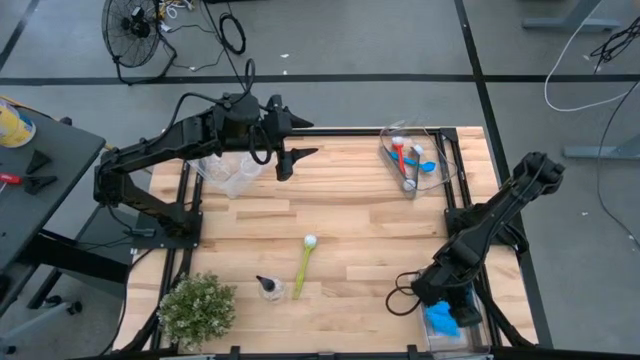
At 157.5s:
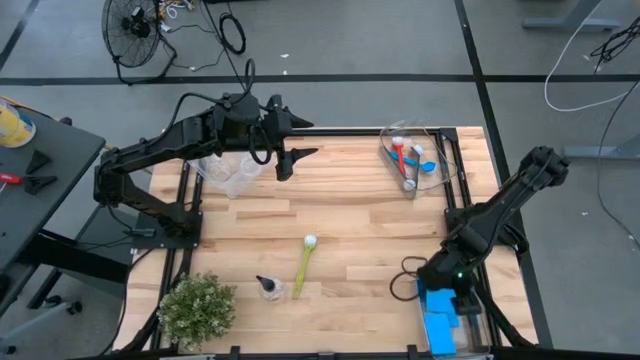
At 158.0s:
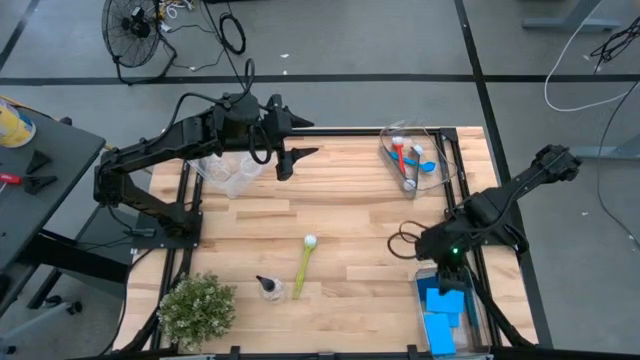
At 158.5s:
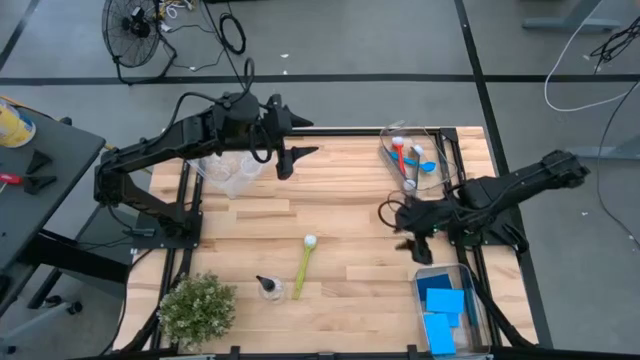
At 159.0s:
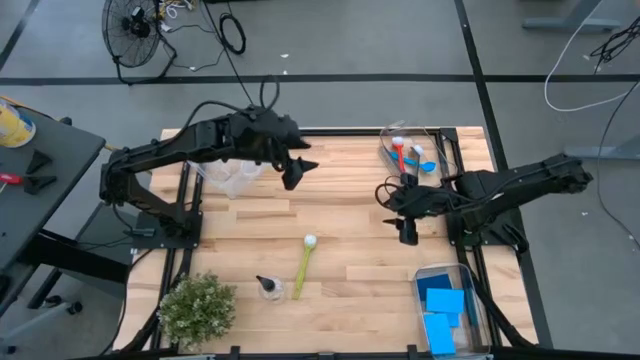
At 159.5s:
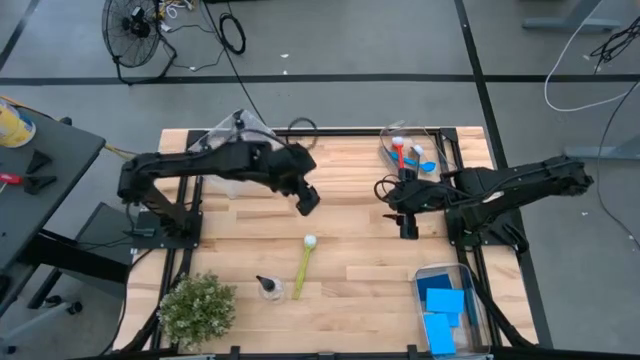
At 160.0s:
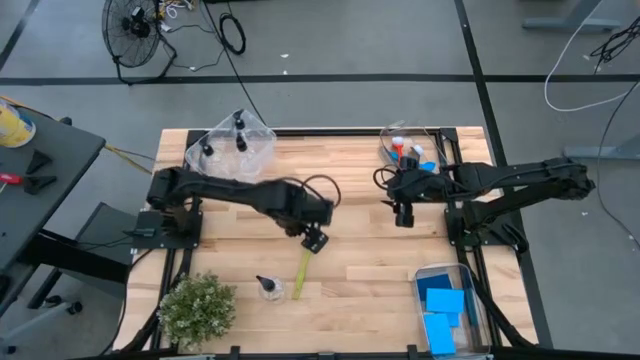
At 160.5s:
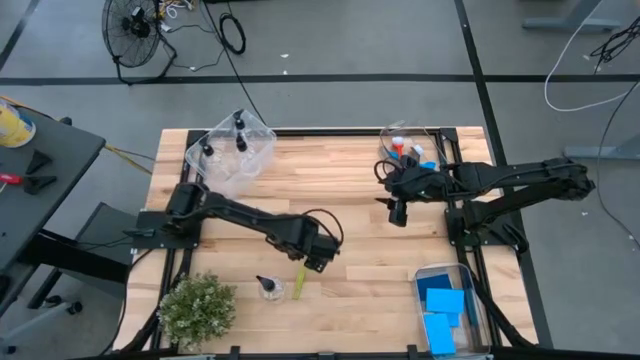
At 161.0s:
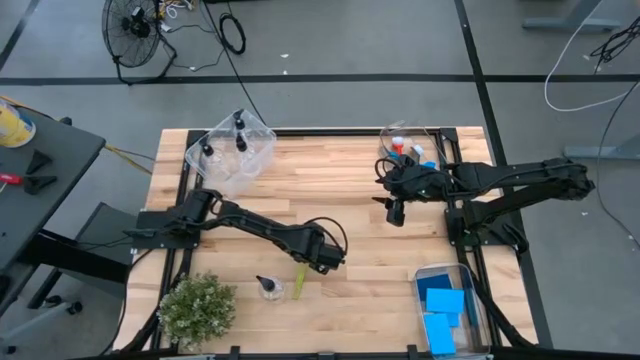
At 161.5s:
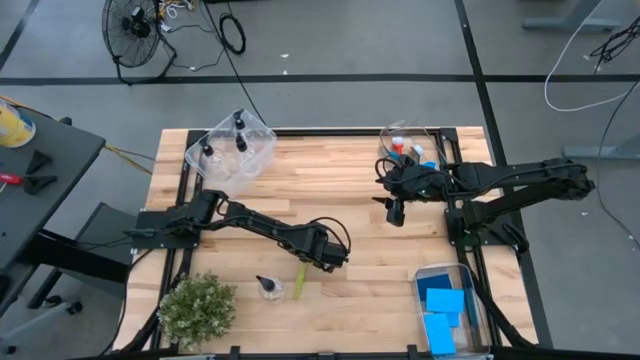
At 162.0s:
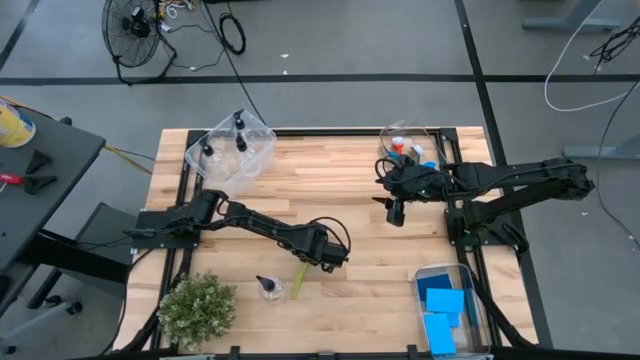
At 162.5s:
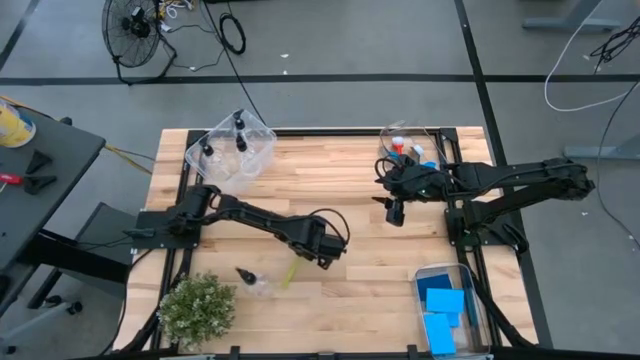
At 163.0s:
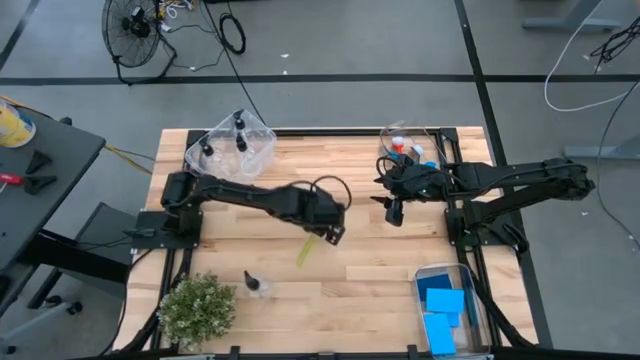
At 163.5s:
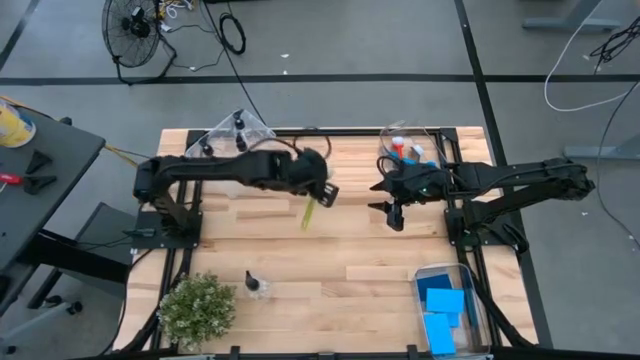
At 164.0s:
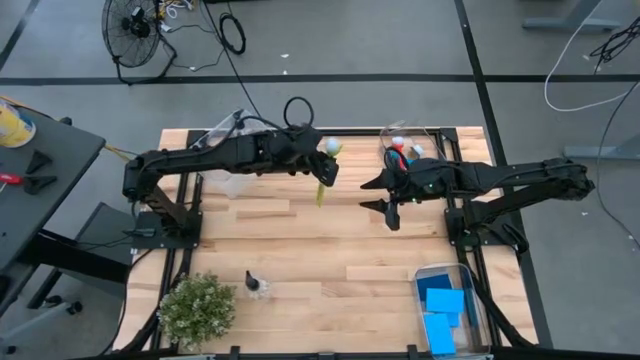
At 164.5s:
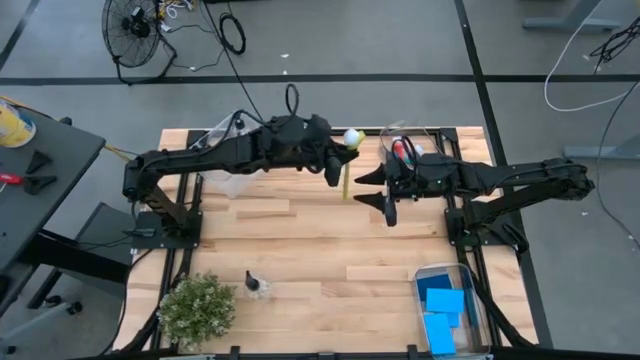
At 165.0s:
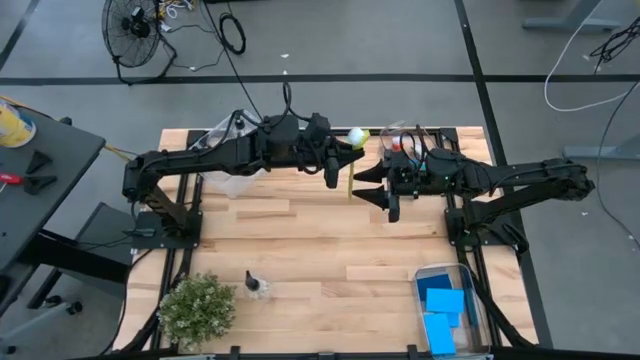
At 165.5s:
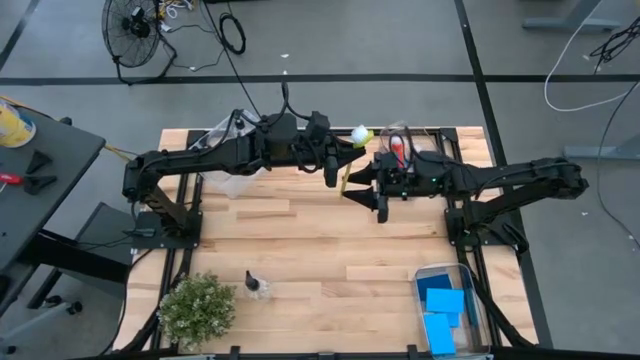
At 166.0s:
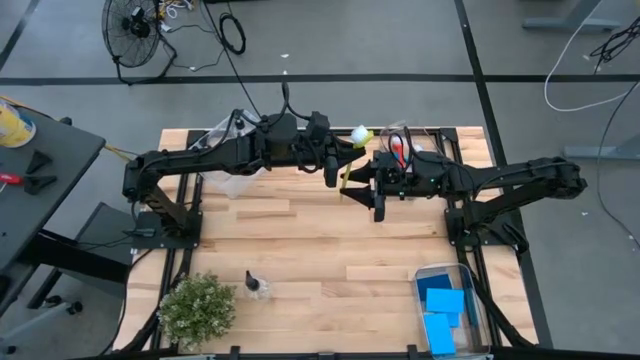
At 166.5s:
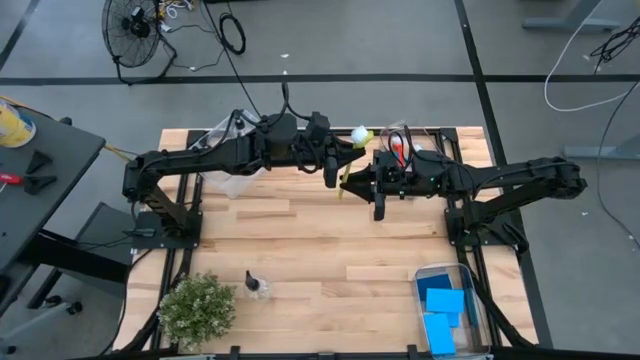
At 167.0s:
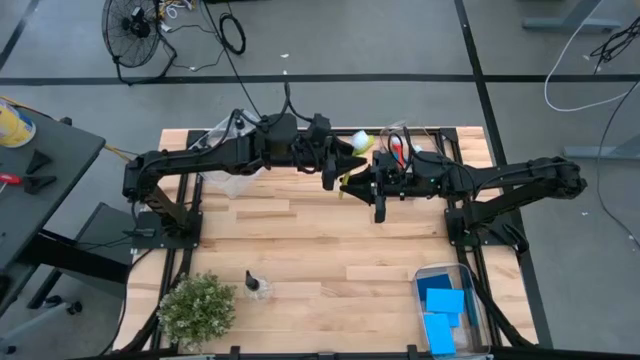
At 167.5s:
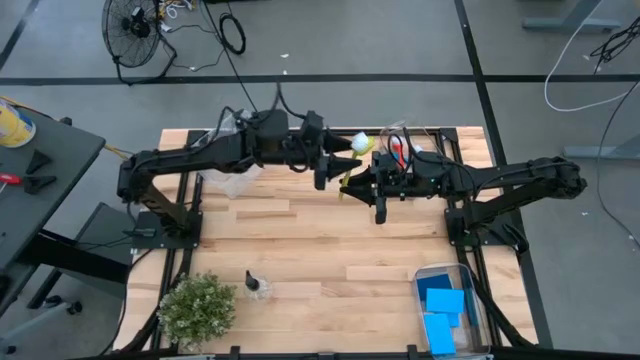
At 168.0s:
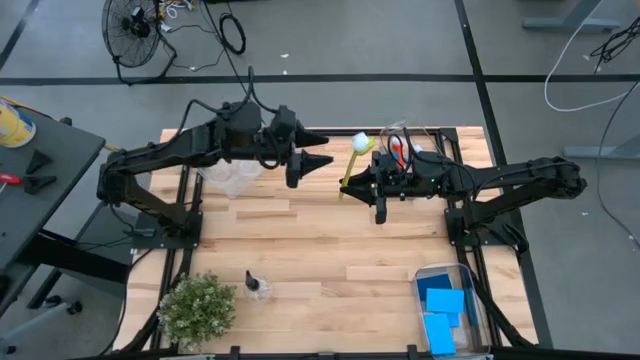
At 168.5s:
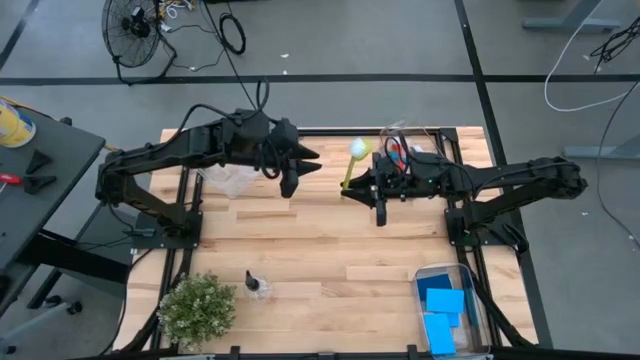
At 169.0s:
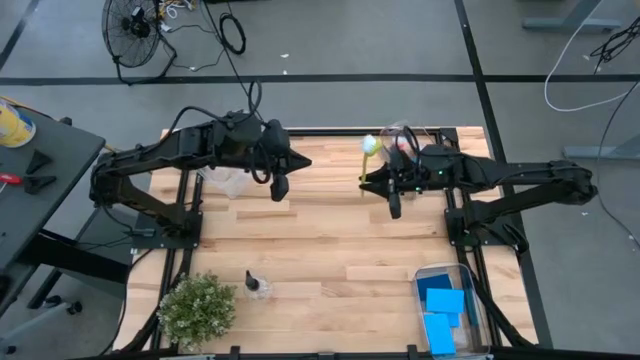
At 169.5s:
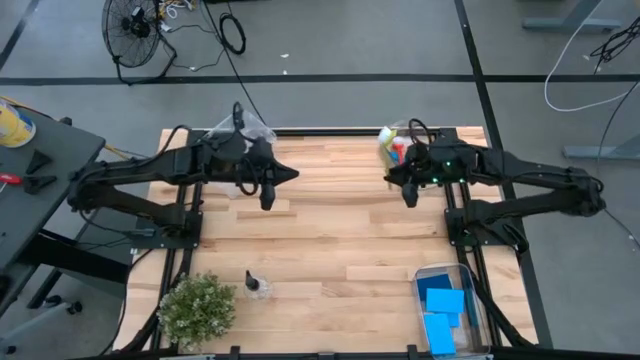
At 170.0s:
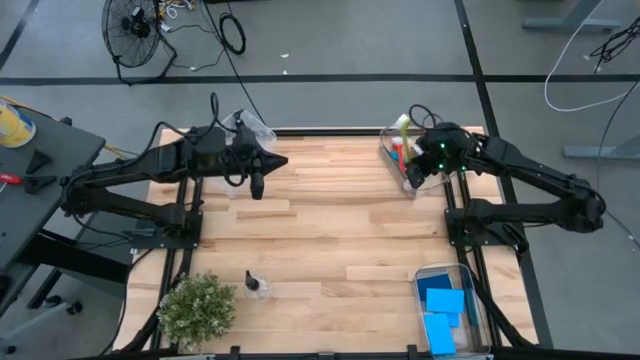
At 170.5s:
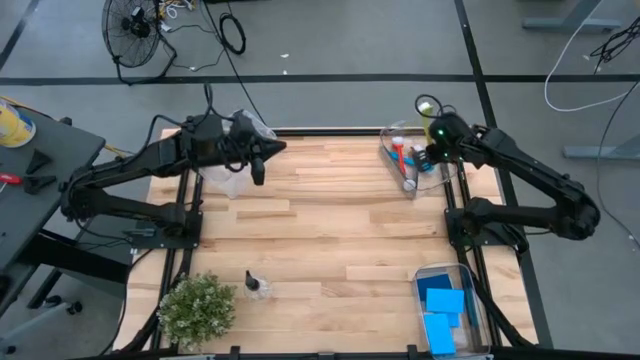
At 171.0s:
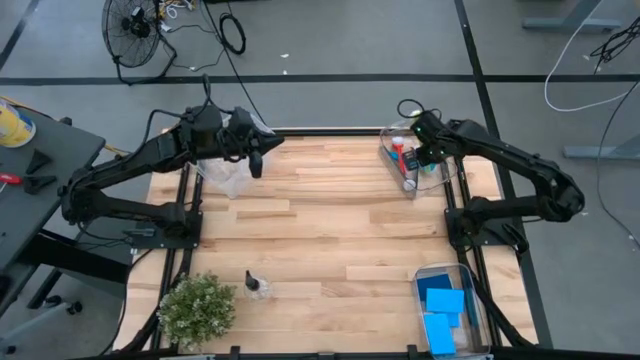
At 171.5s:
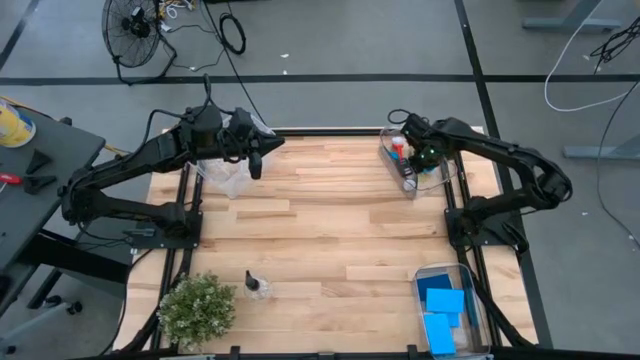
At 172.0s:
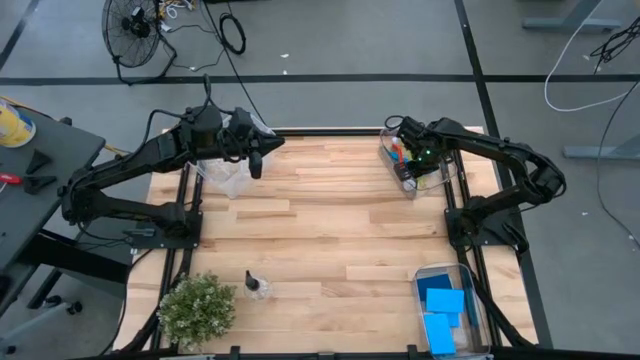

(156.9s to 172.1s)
Task: Pick & Place Kitchen Sink Supplies
Put the green cleaning brush into the top transparent bin

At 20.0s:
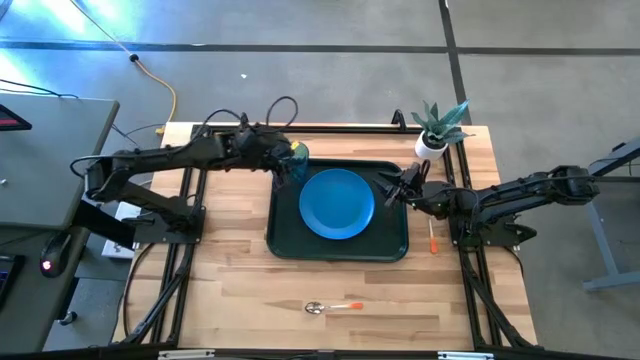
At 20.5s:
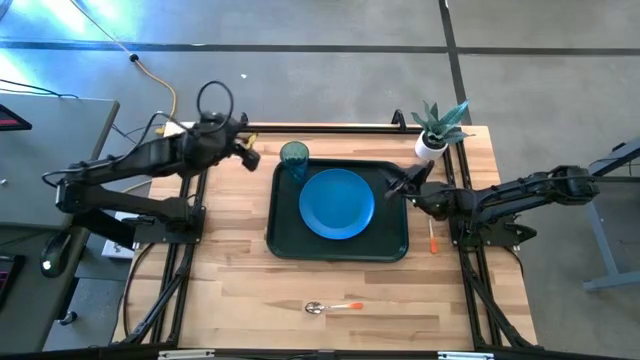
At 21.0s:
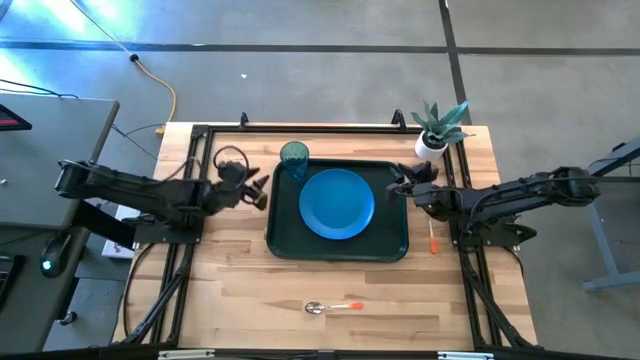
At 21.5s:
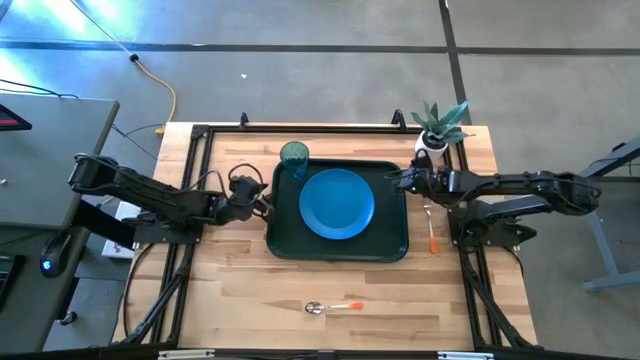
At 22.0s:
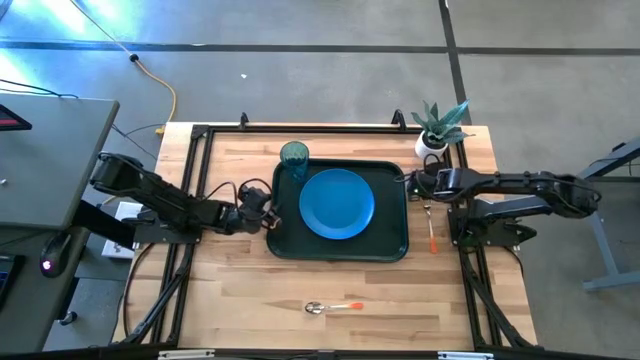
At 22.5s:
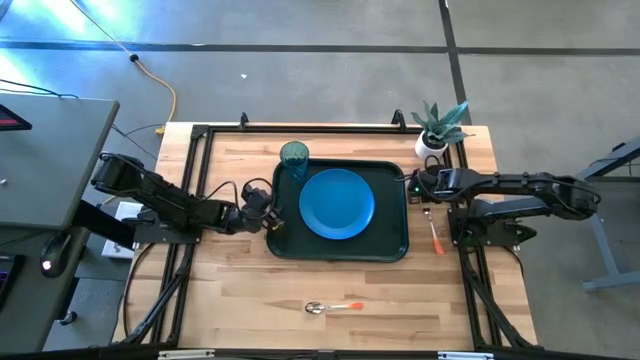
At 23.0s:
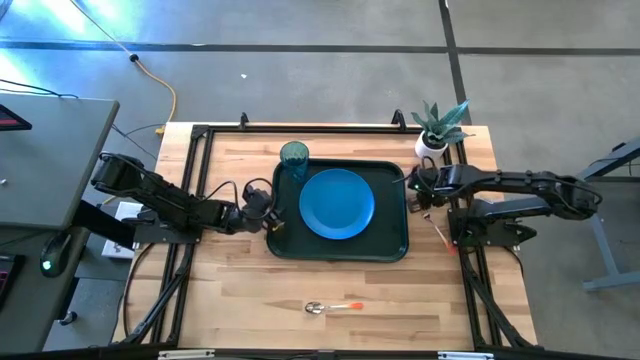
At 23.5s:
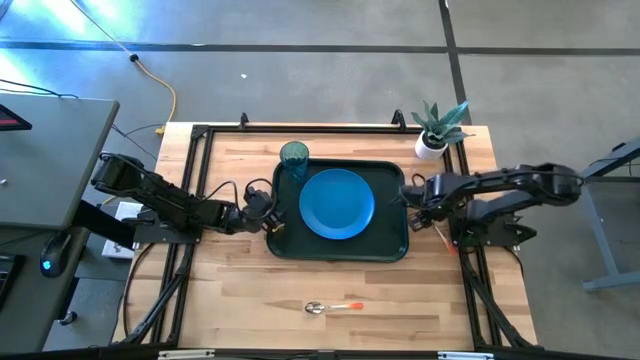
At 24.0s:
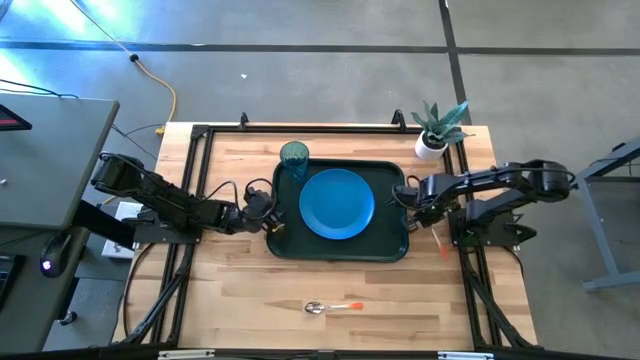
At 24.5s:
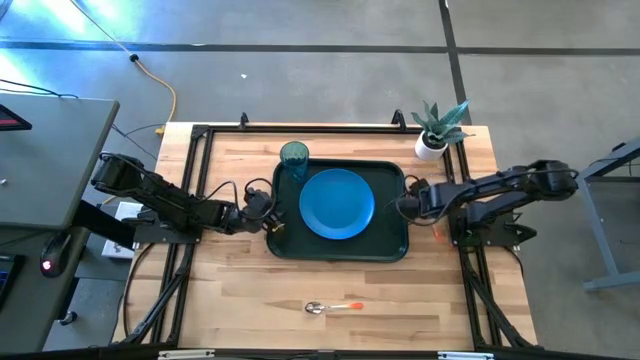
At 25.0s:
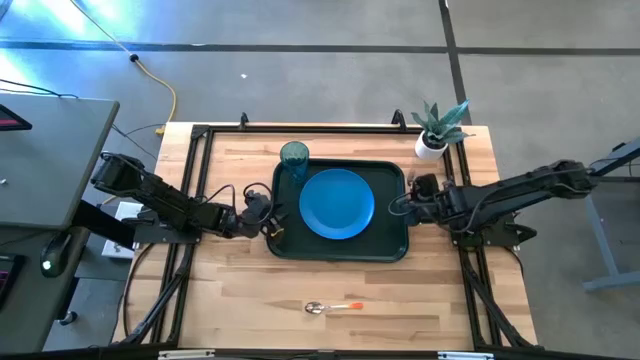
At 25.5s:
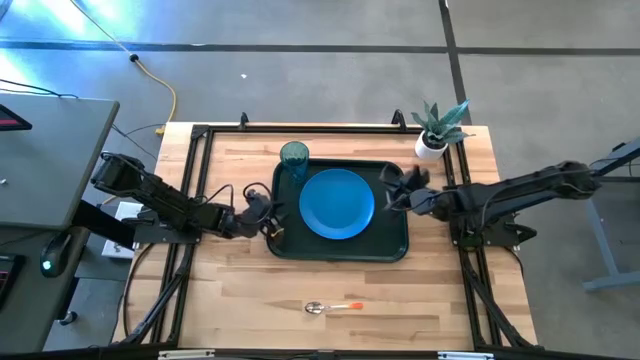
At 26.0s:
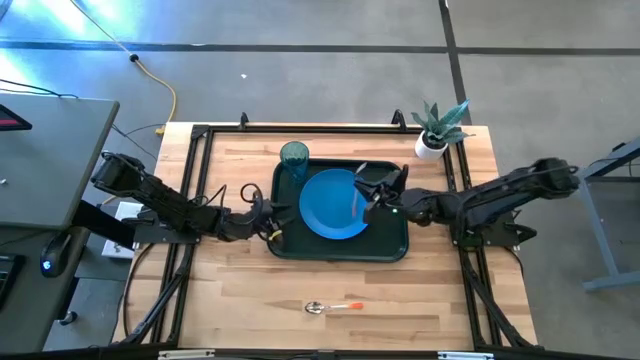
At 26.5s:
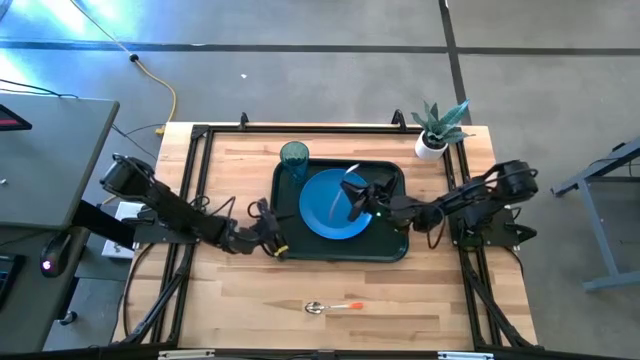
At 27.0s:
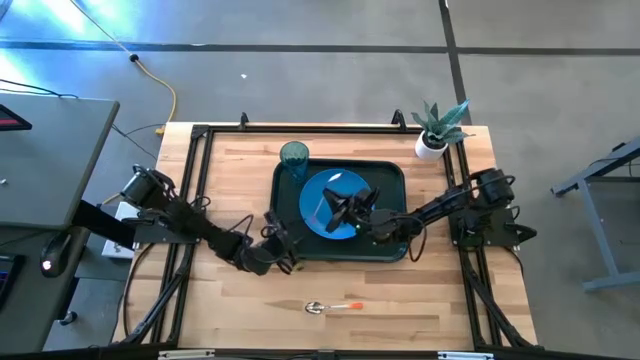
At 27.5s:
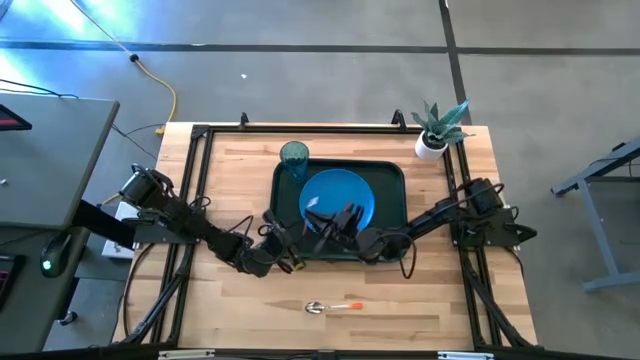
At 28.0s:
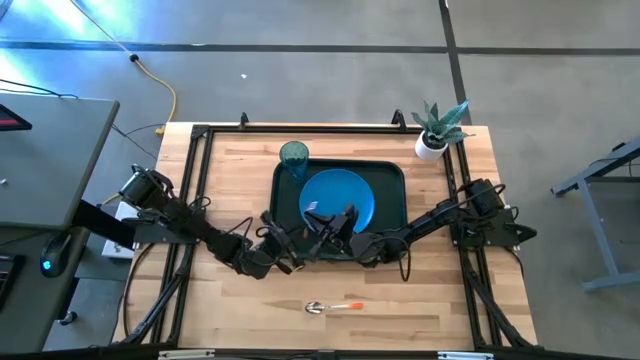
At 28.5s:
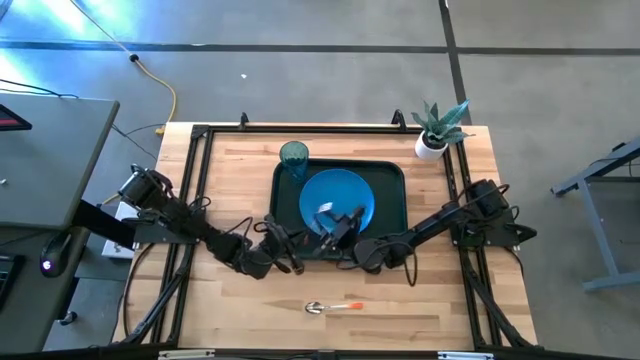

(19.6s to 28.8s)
Task: Pick and place plate/cup/fork/spoon on tray
Put the orange fork on the dark green tray to the left of the blue plate
